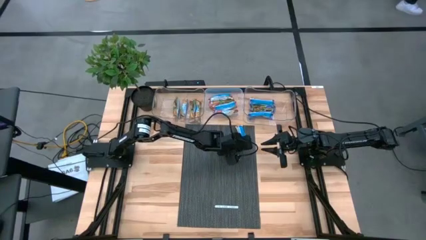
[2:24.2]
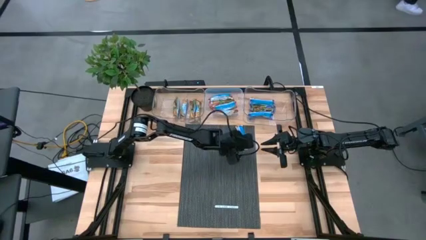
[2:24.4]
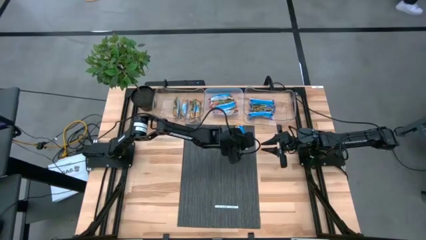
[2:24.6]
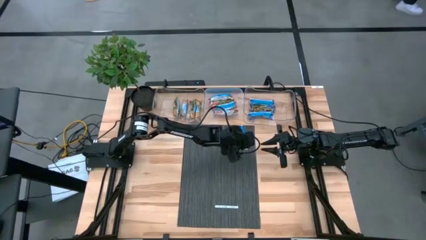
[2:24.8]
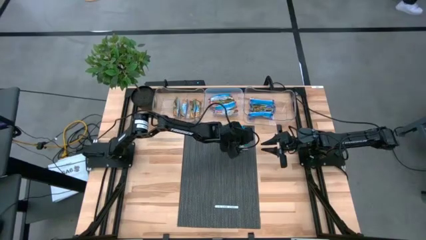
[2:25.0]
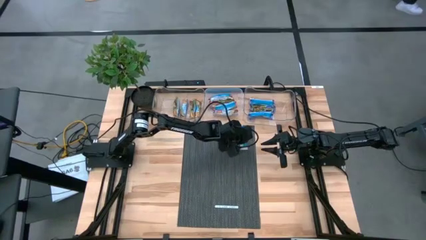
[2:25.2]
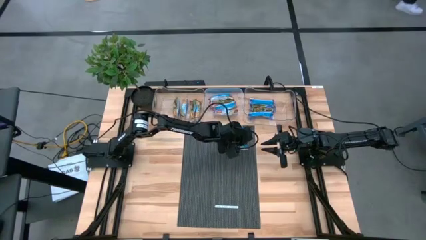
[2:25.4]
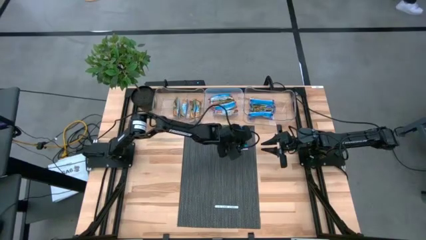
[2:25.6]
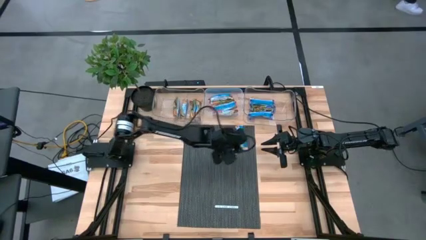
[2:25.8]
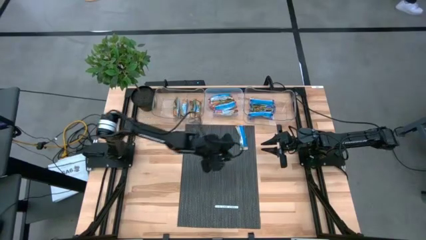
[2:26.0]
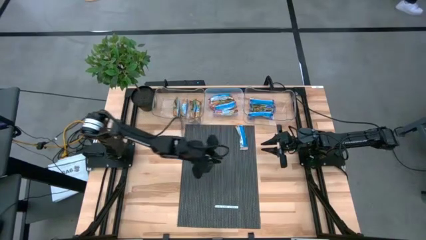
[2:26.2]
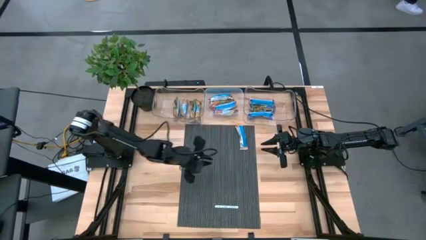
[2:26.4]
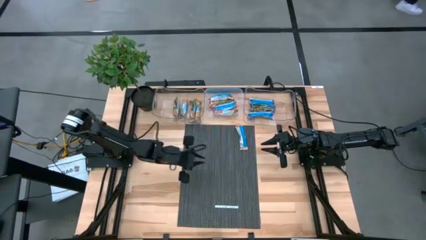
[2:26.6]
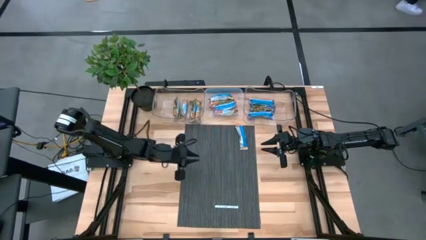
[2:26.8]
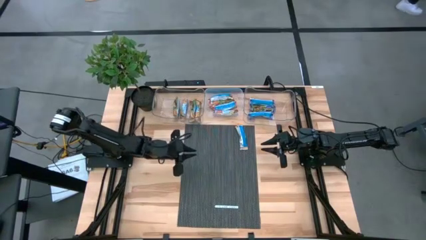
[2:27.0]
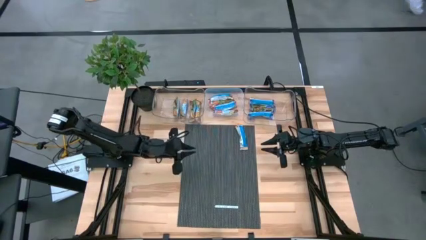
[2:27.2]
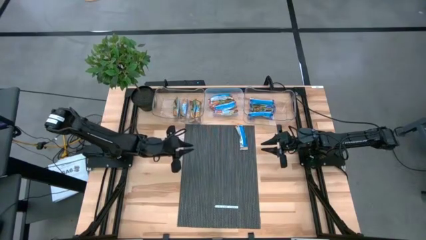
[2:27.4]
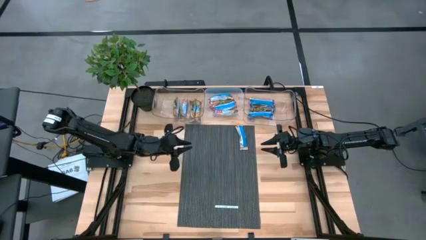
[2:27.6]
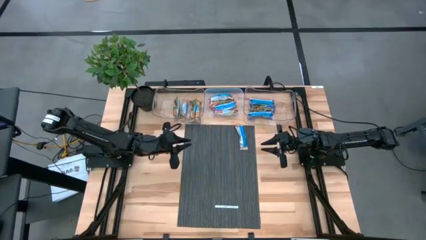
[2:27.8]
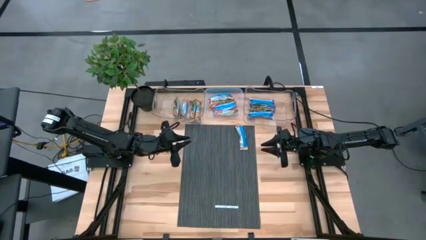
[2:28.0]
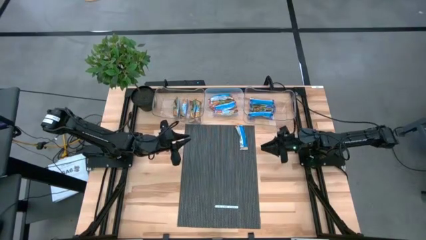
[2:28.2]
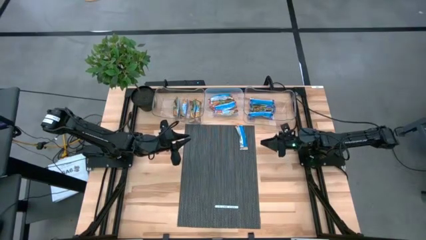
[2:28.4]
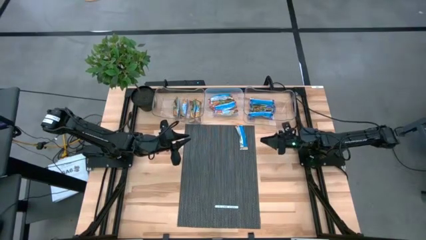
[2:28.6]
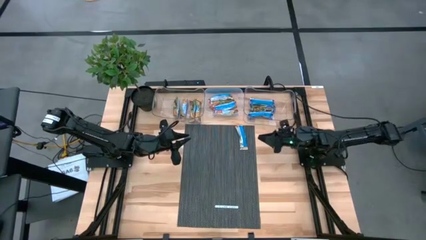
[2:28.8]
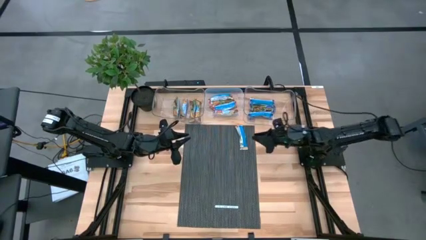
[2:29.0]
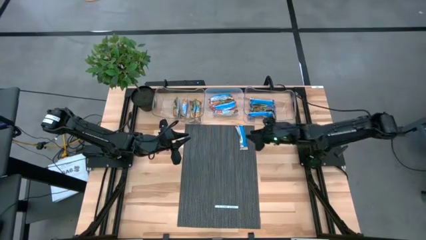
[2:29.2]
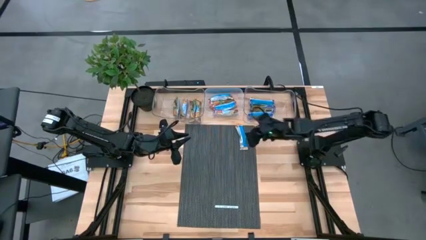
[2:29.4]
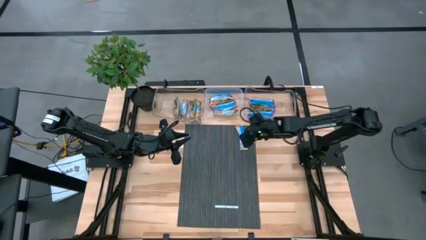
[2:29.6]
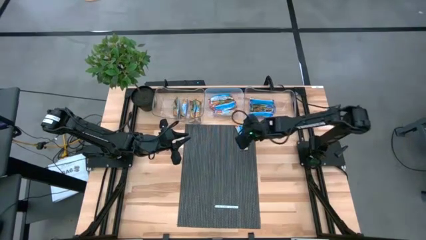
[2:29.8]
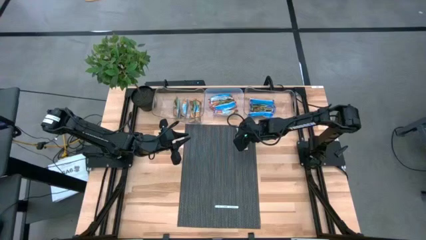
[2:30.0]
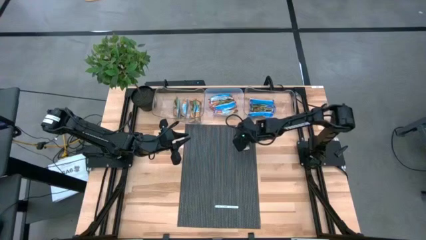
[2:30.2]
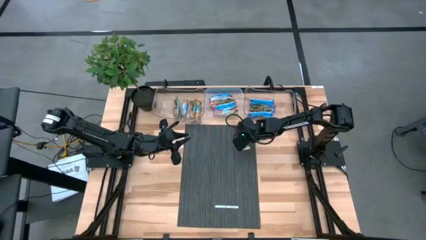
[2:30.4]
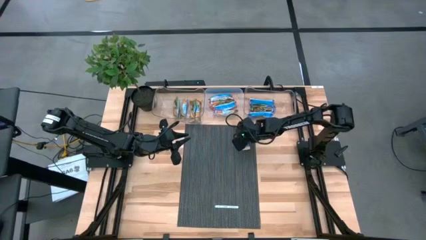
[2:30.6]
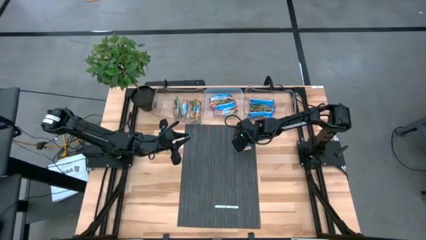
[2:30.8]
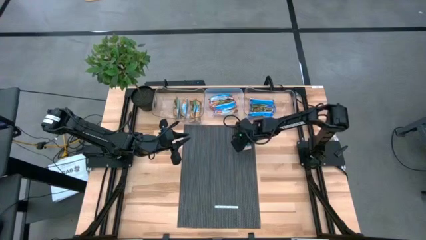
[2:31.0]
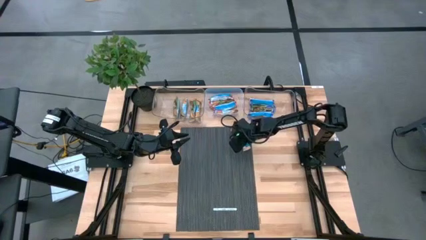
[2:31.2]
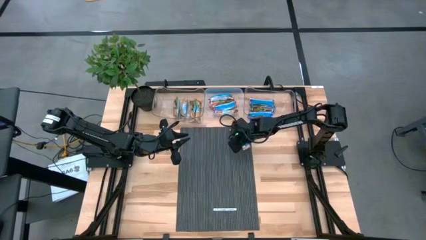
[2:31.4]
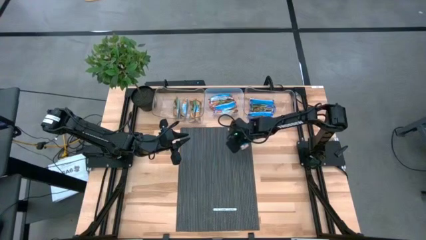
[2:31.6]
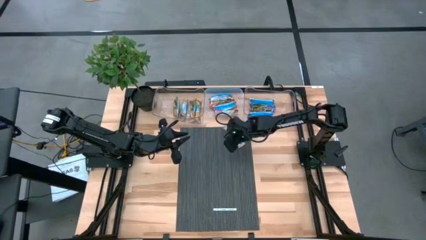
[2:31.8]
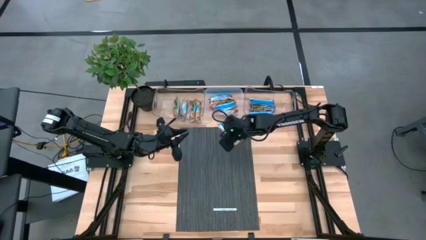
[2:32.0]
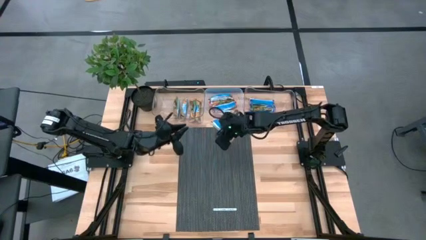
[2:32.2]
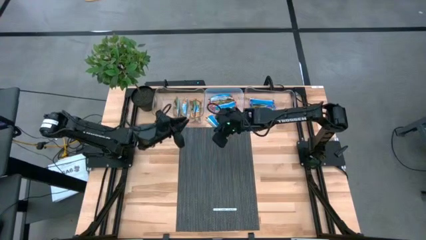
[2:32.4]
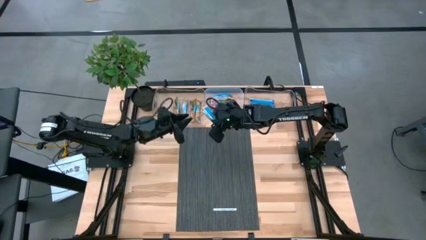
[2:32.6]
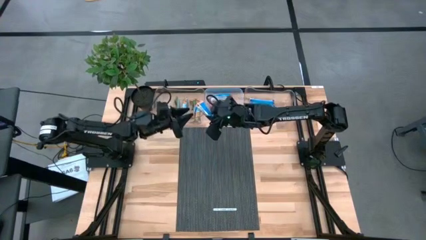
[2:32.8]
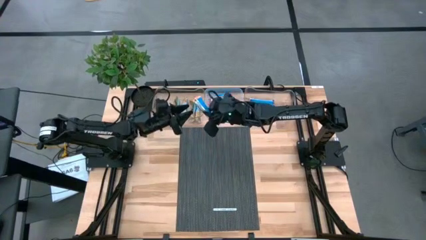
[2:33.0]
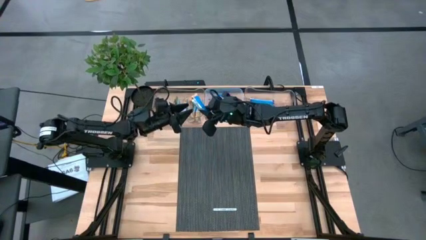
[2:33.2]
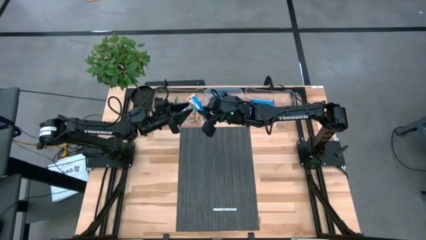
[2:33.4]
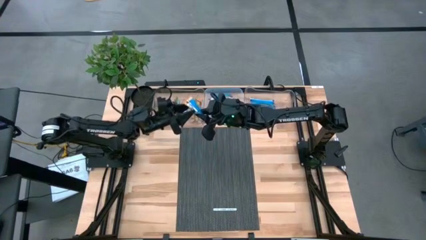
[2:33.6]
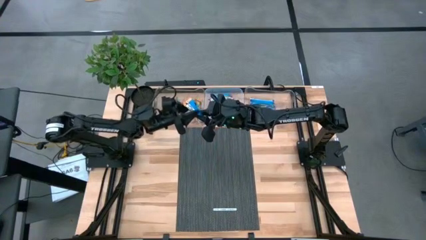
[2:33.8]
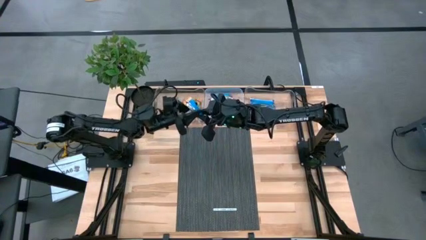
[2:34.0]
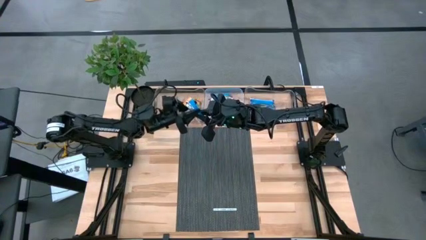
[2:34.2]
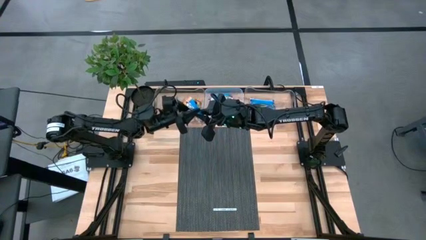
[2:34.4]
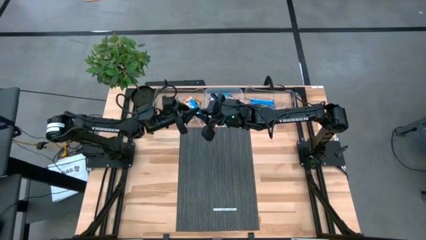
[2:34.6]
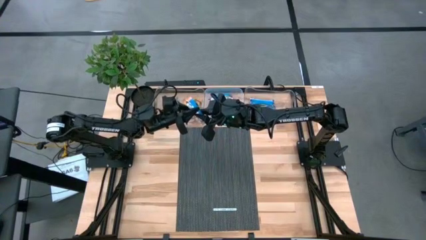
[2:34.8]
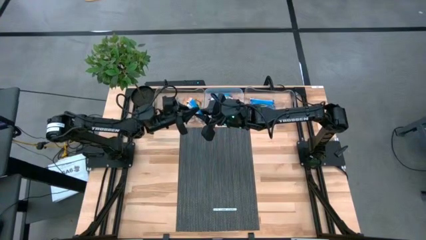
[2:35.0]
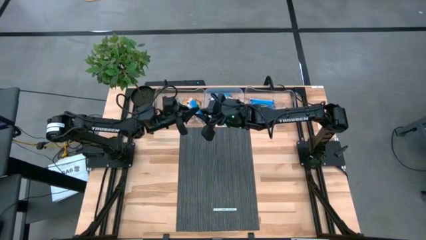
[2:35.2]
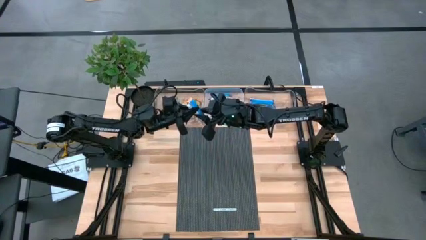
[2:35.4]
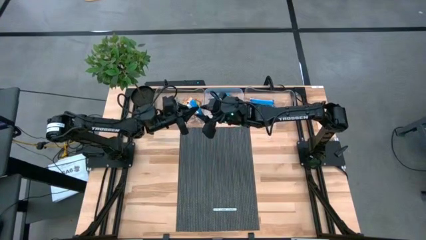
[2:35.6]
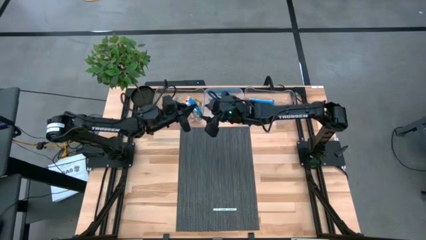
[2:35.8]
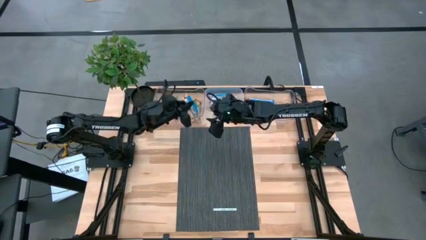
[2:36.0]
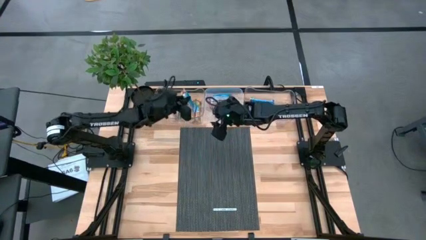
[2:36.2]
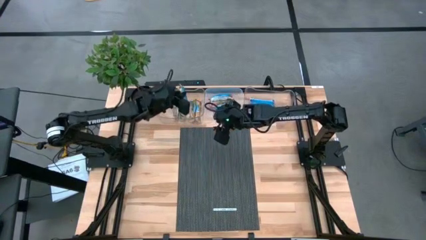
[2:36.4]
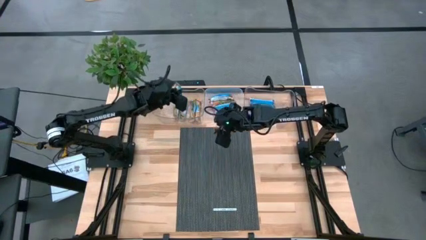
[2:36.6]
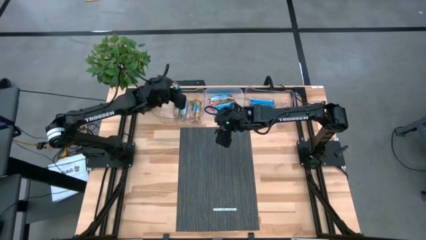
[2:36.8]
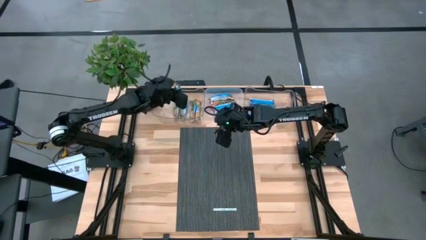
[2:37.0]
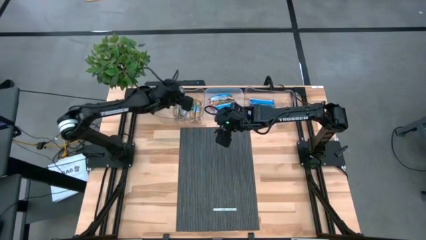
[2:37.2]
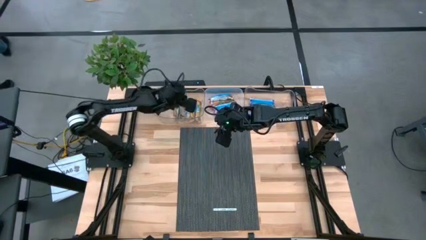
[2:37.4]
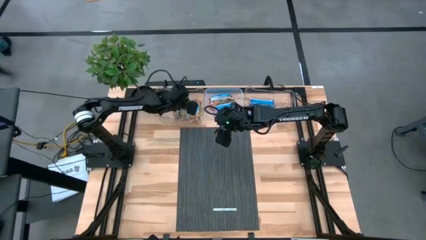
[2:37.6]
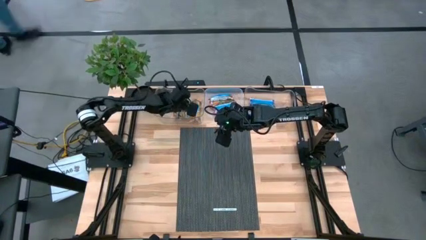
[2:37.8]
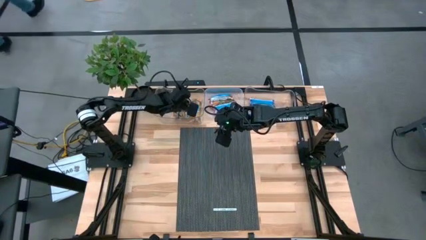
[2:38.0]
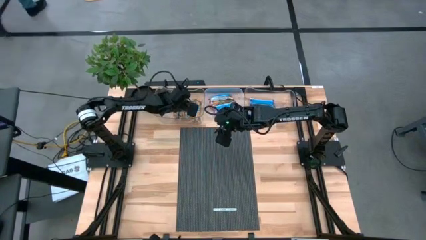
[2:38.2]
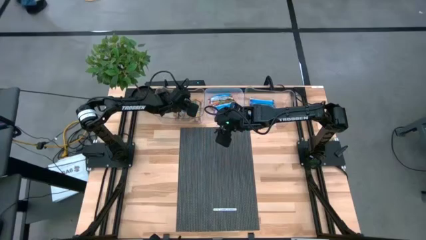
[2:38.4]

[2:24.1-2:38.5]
Task: Pick and place Granola Bars by type
Put the orange granola bar into the left transparent bin

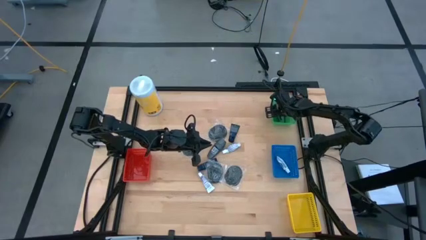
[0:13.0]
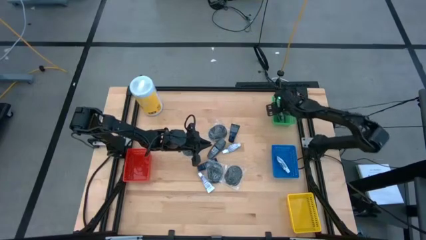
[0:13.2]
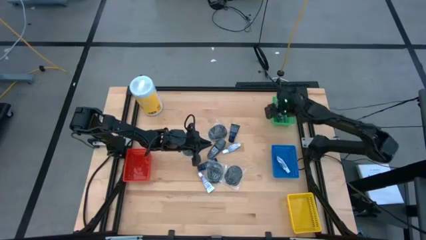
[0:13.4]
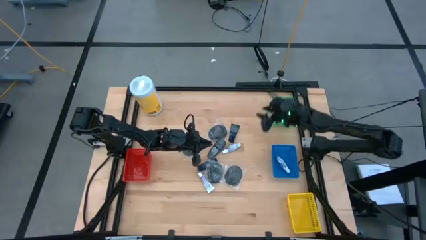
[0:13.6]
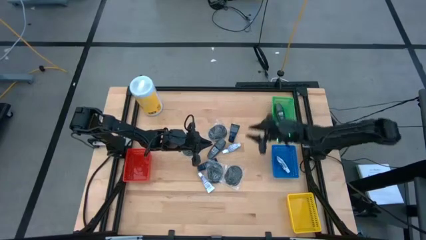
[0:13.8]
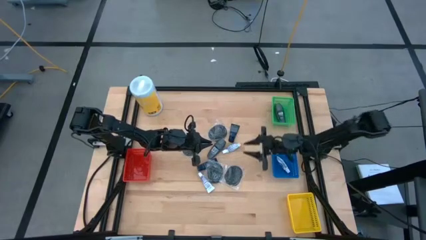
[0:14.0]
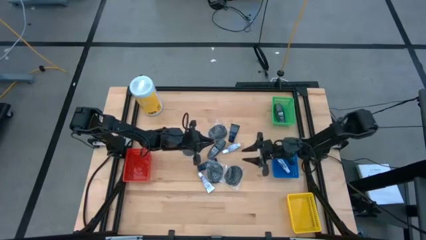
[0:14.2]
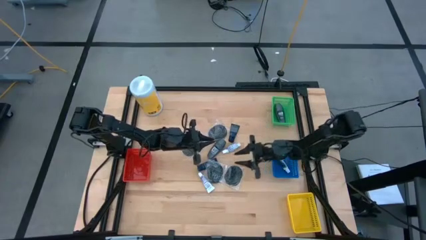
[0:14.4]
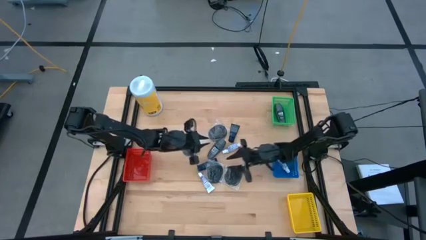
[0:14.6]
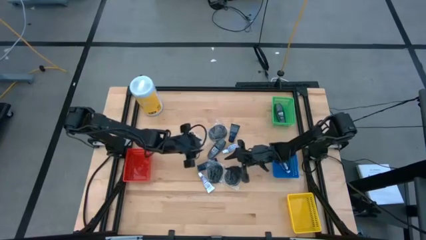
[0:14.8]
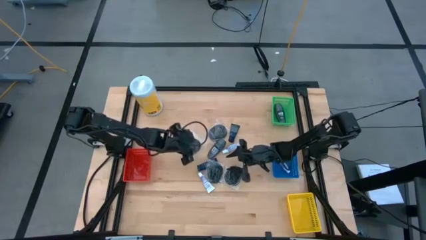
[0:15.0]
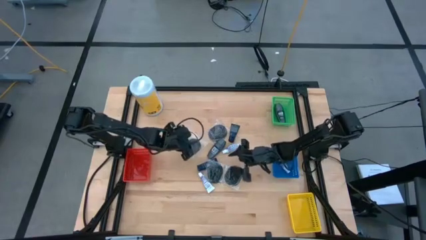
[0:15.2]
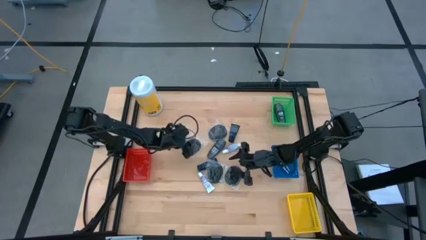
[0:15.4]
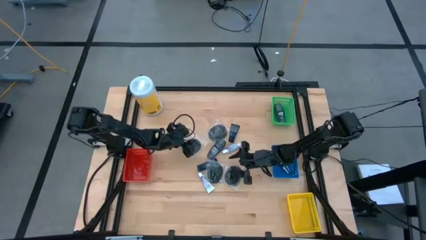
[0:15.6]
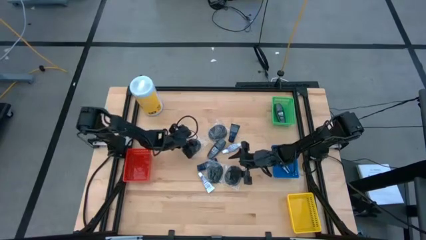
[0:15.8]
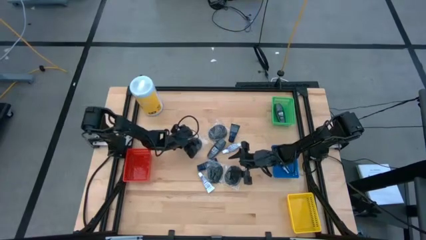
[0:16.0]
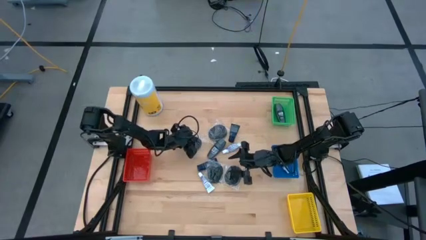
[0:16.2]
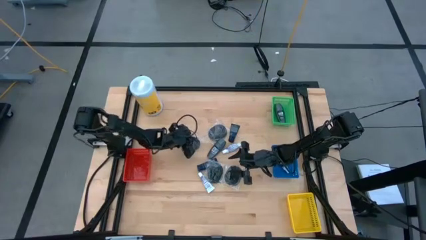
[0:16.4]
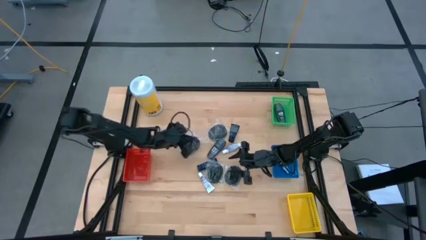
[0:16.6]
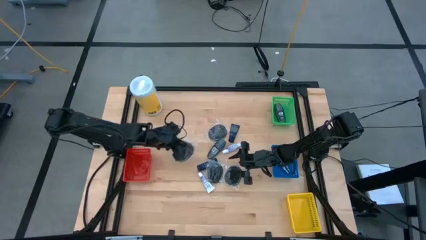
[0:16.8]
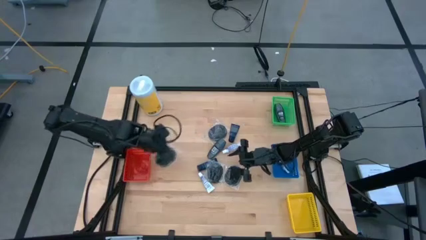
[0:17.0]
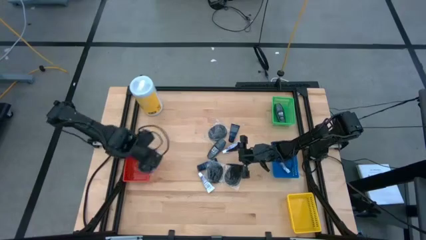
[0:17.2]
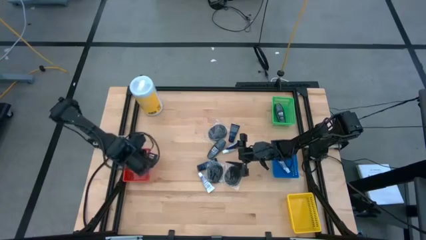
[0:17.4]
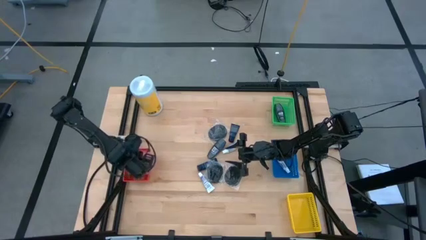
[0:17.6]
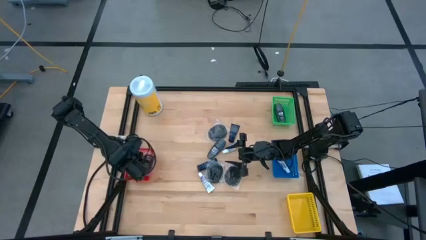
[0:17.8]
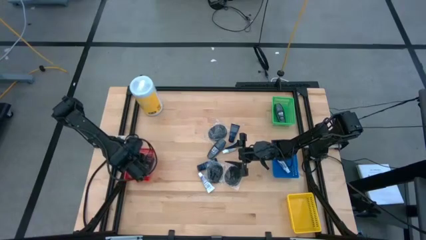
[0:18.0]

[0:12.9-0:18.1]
Task: Pick & Place Travel size toiletries
Put the hair comb into the red bin
